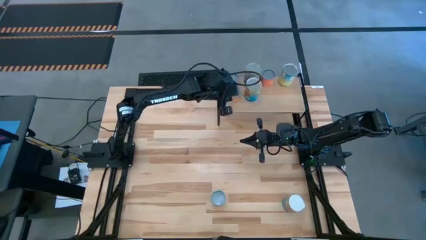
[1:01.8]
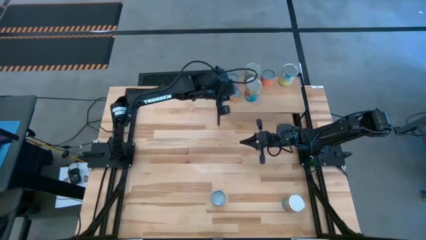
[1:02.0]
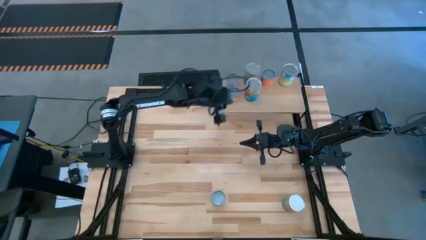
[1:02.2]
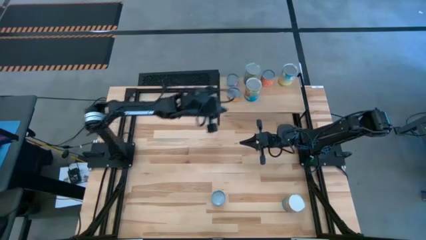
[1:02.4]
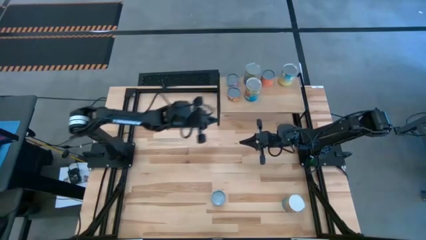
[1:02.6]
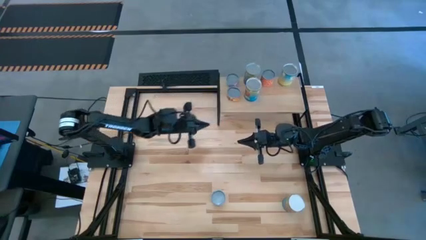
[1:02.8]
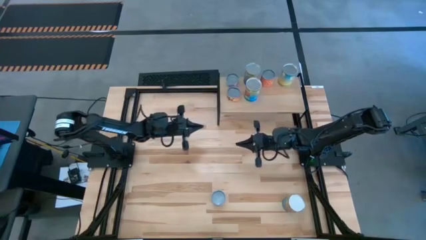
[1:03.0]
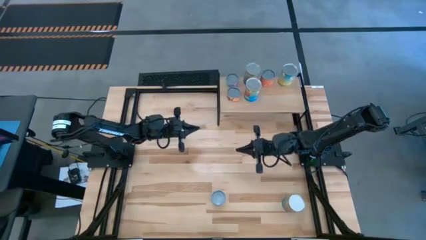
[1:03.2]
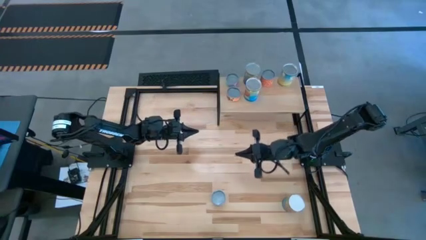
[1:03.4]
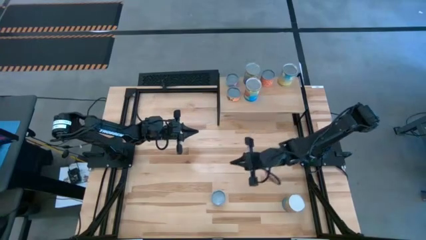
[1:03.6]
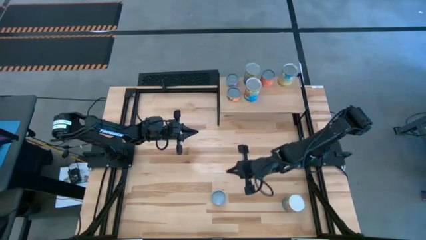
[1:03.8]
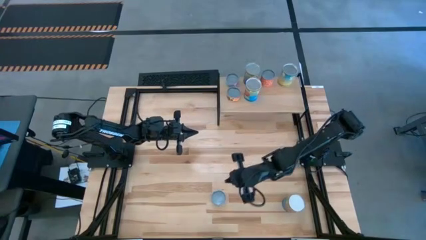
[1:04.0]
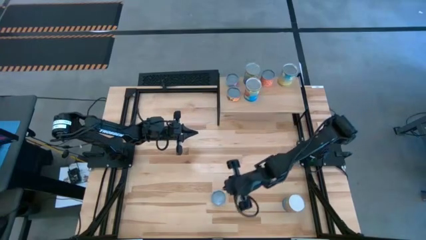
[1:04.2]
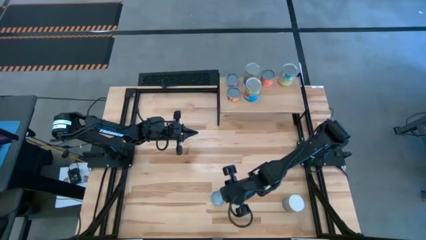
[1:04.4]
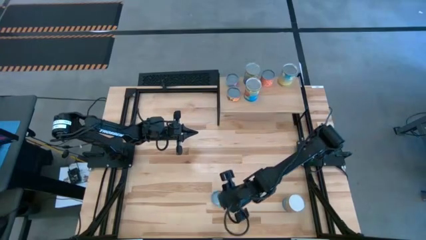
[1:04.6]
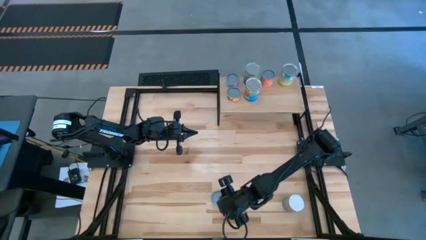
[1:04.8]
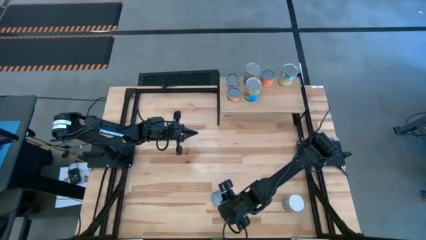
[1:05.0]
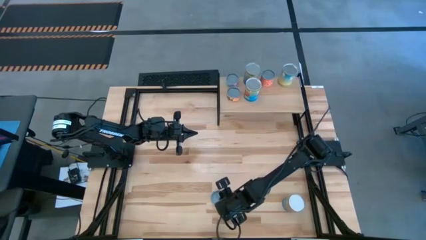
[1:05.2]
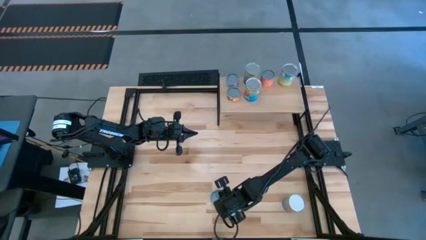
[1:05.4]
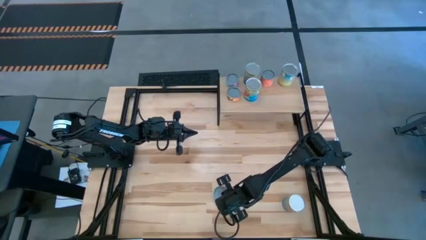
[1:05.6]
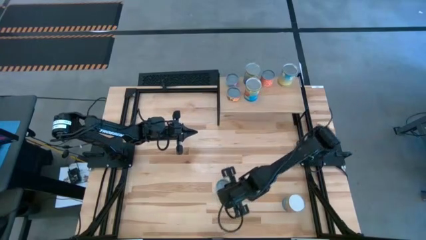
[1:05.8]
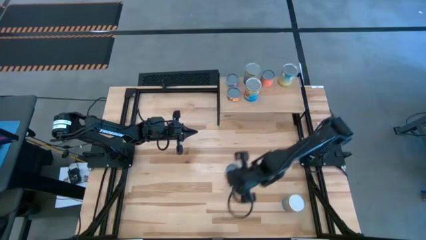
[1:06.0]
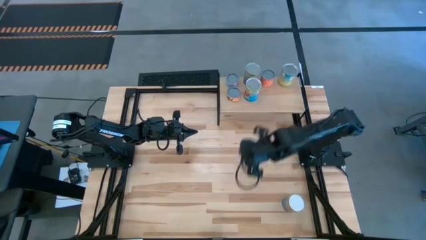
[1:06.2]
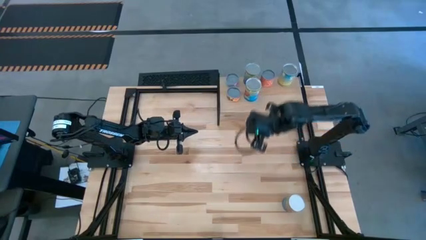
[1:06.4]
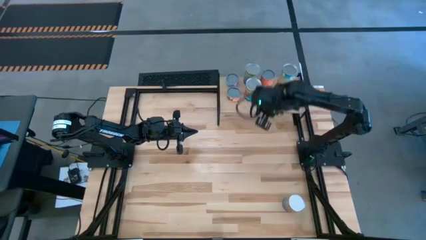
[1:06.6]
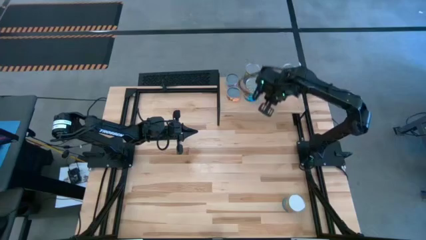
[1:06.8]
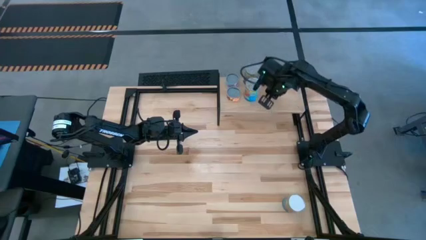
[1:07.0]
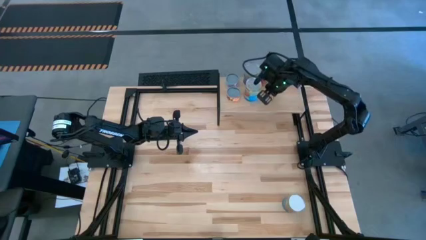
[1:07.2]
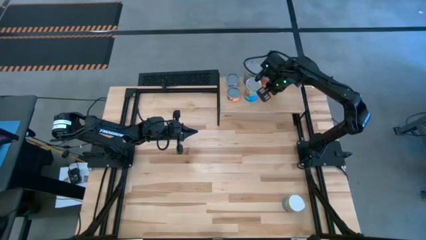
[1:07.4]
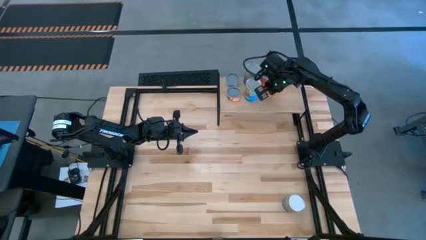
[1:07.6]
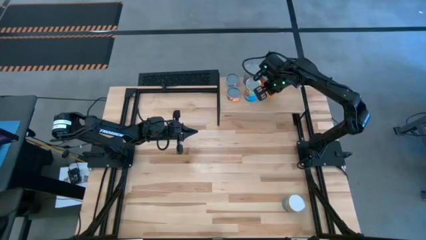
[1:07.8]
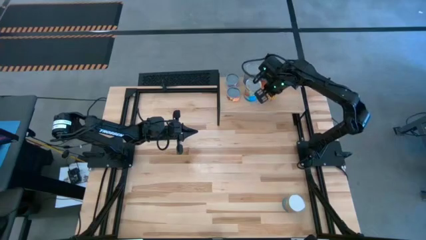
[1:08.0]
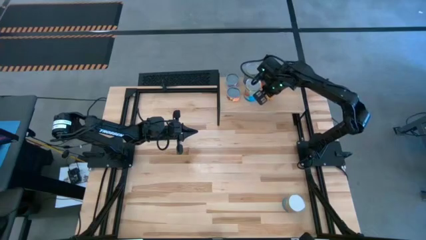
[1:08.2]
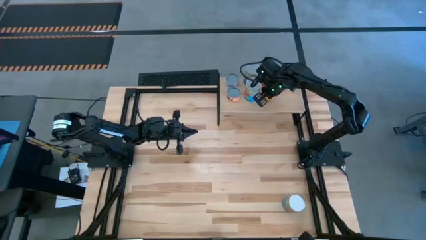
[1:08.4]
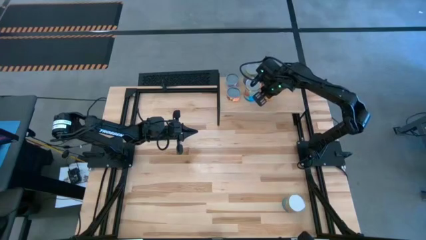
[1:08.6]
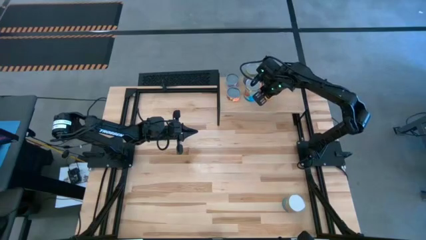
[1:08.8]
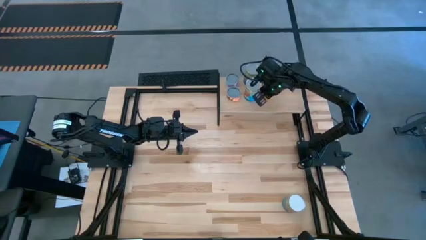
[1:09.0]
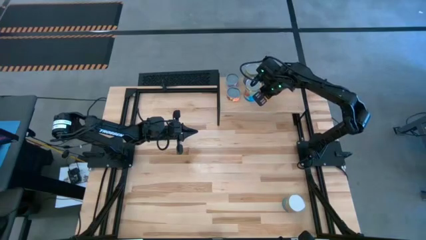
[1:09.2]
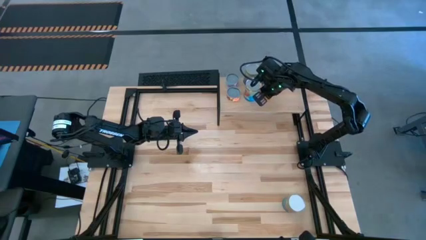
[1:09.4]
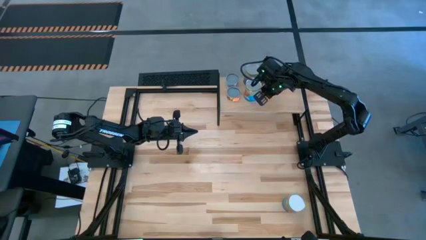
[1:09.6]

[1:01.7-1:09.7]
Task: Pick and place cans onto a shelf
Put the canned spicy black beans on the shelf

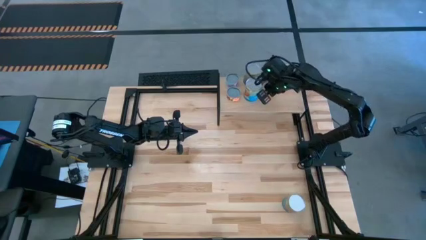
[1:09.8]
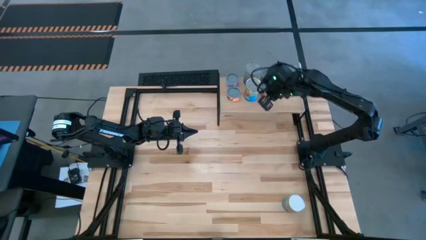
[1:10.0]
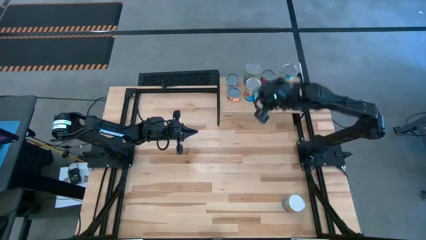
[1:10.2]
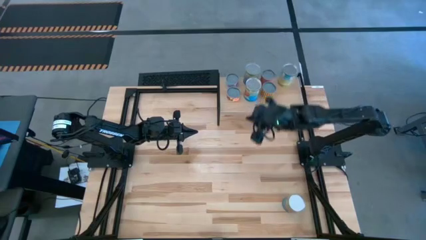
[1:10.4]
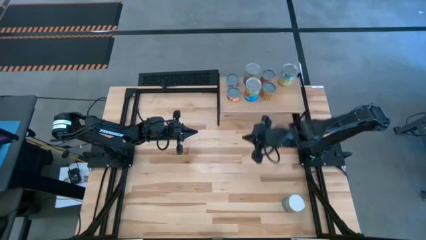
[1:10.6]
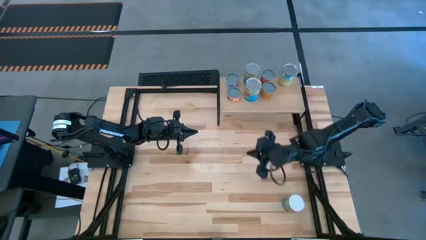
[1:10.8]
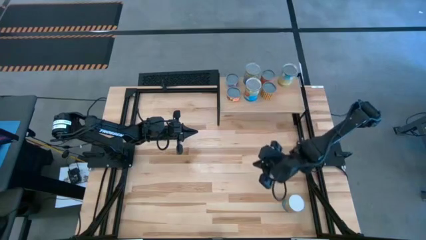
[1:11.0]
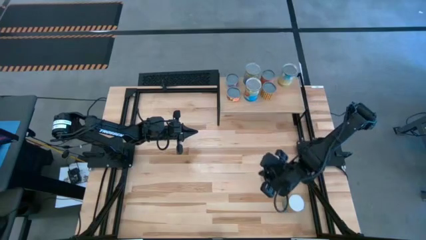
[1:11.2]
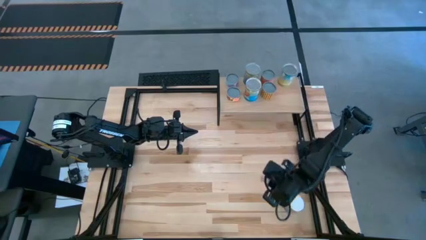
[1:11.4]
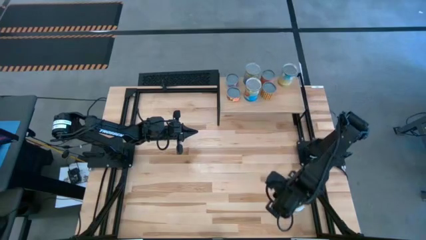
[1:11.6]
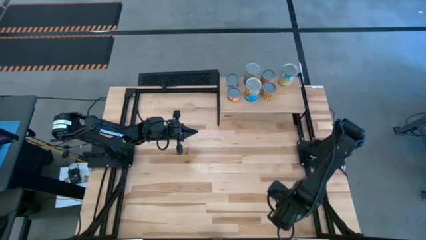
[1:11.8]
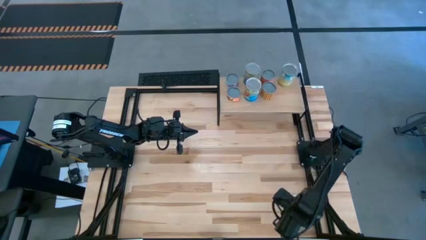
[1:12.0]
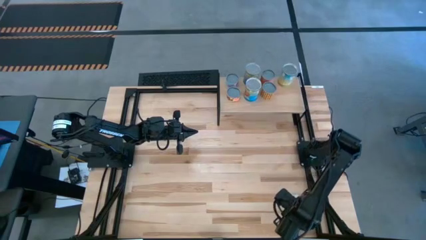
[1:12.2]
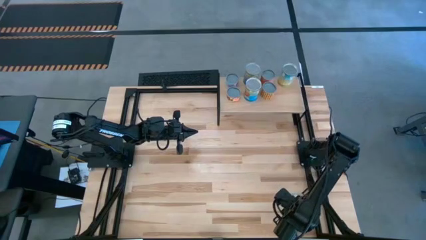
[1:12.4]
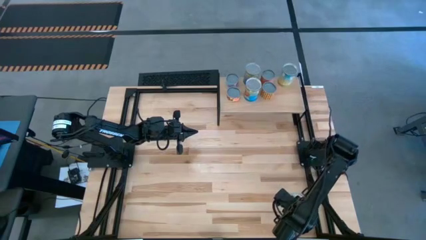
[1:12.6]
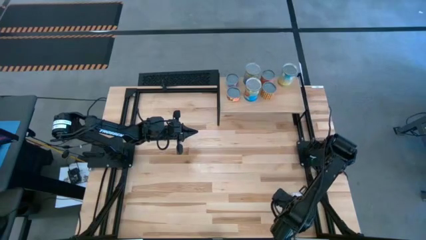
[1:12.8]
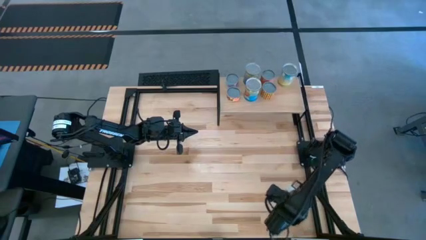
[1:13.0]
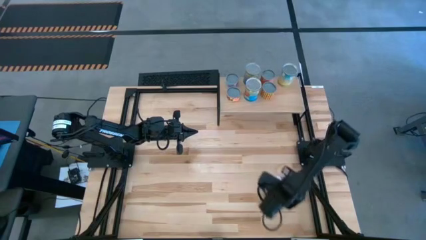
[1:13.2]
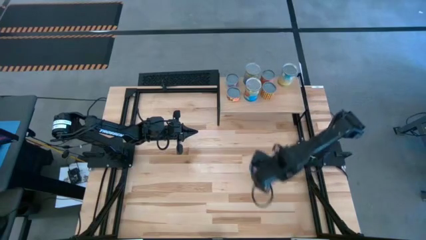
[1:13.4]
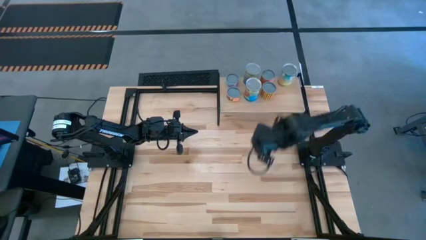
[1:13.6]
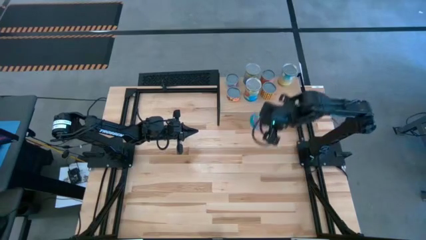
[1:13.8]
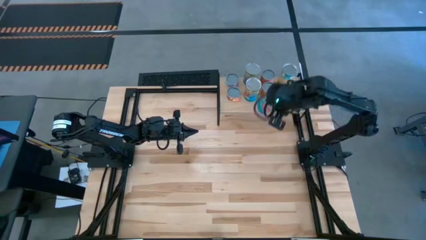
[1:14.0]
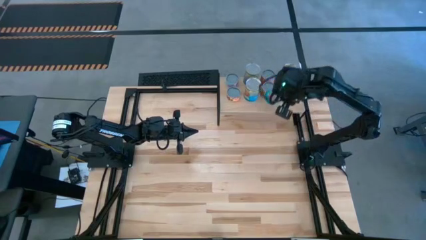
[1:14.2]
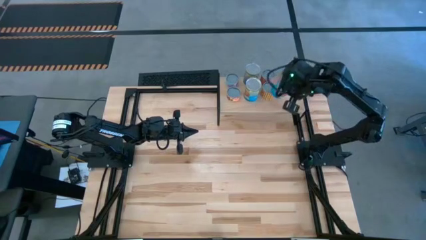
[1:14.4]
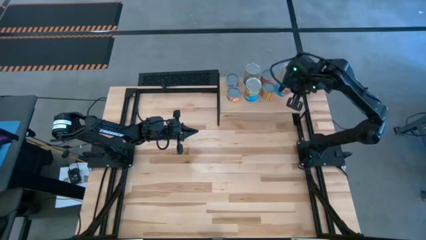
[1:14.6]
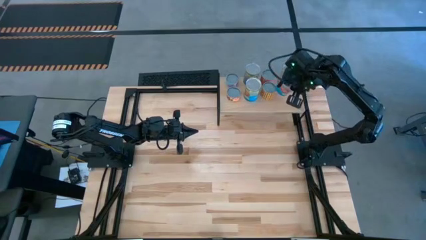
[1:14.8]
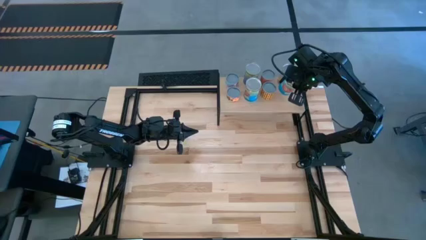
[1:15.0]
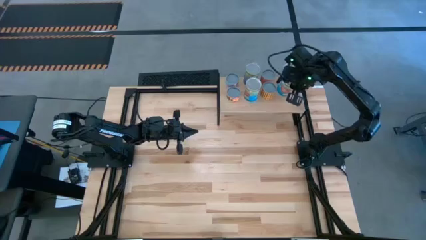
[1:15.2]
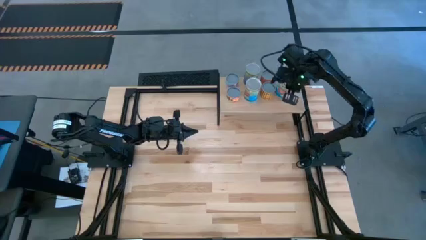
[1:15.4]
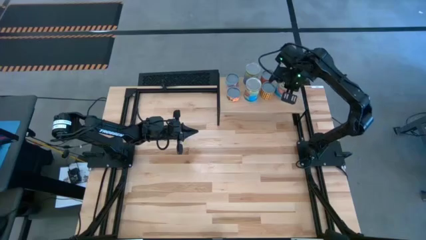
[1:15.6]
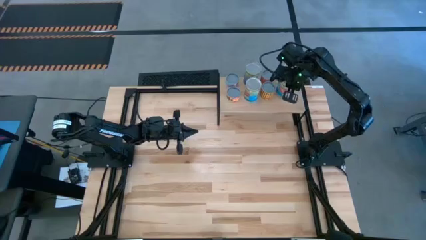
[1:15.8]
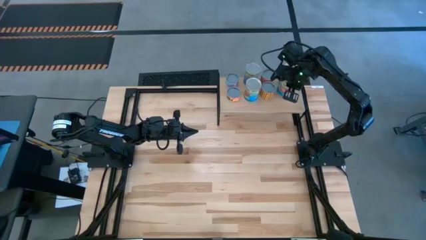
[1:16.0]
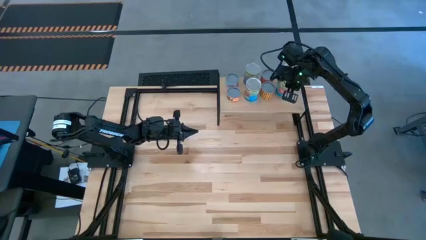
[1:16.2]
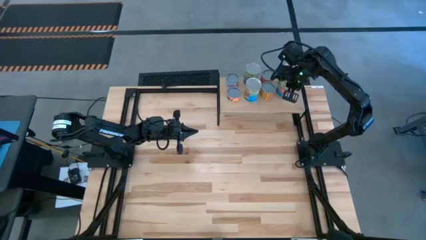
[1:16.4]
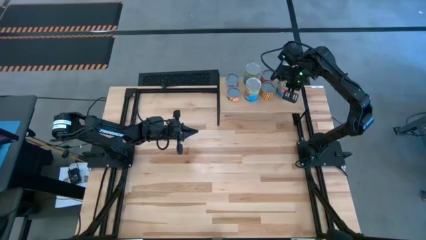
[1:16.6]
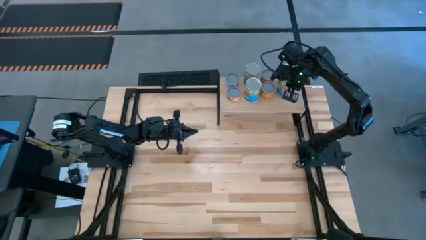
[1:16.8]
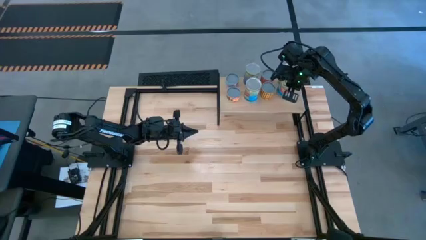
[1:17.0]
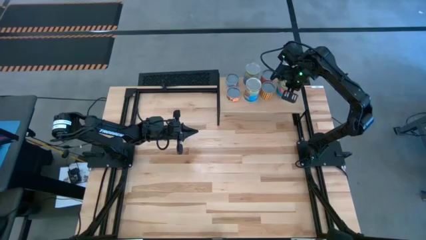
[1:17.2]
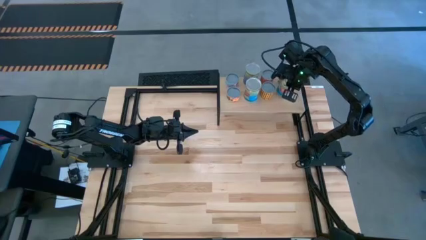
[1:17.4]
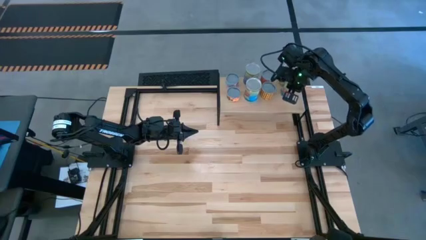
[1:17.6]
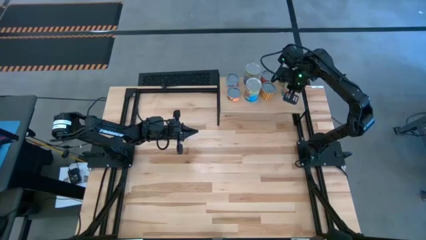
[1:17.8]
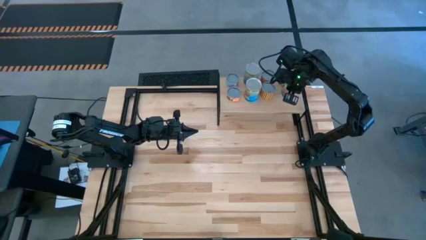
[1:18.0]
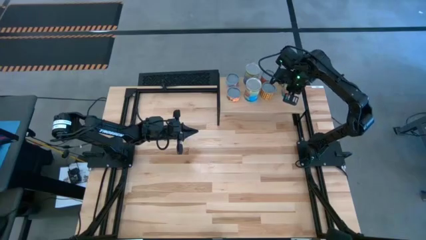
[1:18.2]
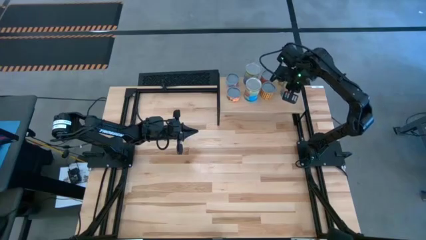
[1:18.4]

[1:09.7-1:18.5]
Put the canned tomatoes on the shelf
